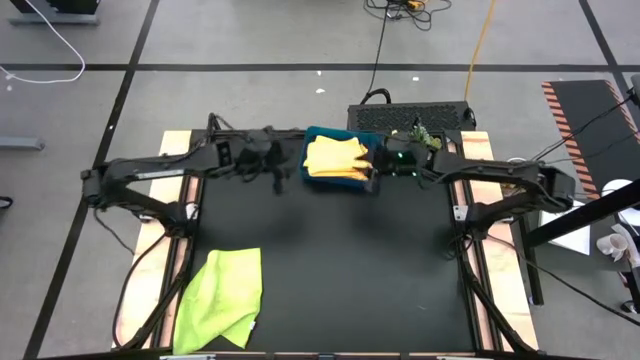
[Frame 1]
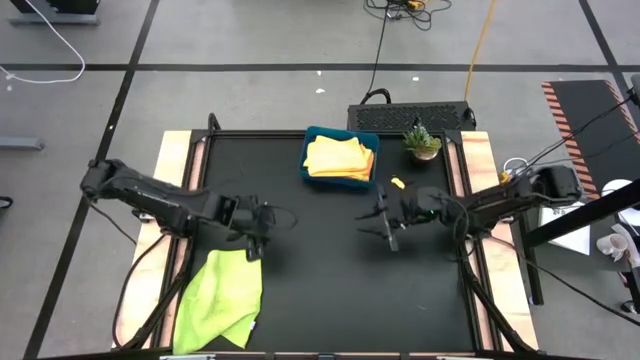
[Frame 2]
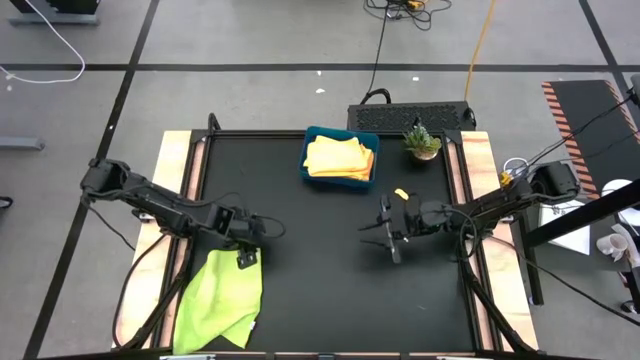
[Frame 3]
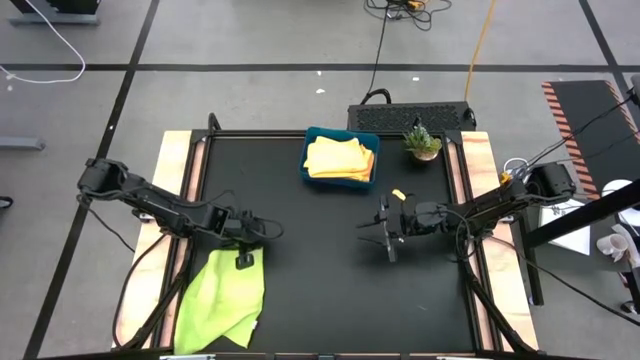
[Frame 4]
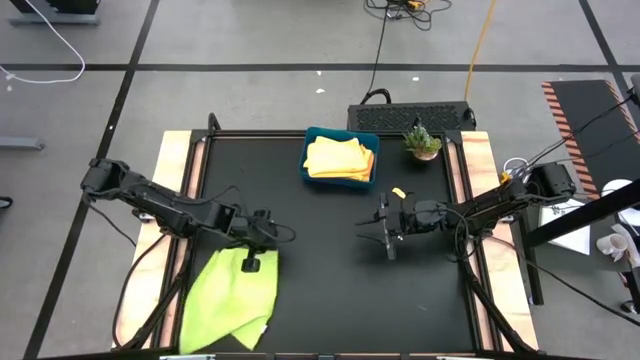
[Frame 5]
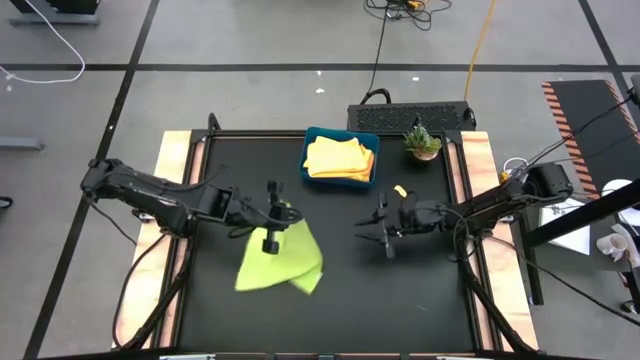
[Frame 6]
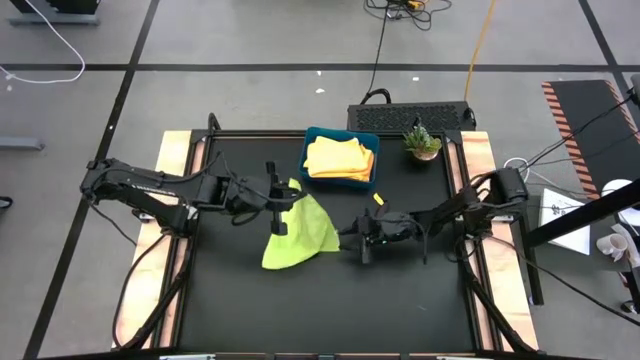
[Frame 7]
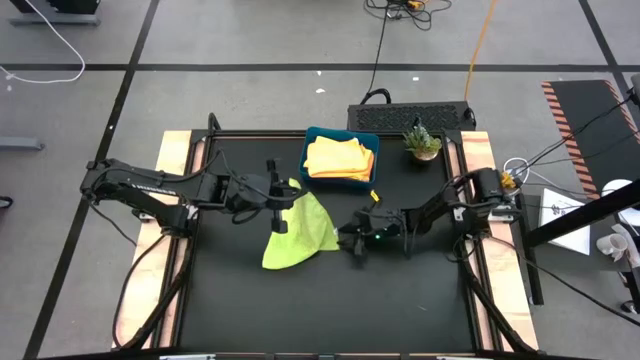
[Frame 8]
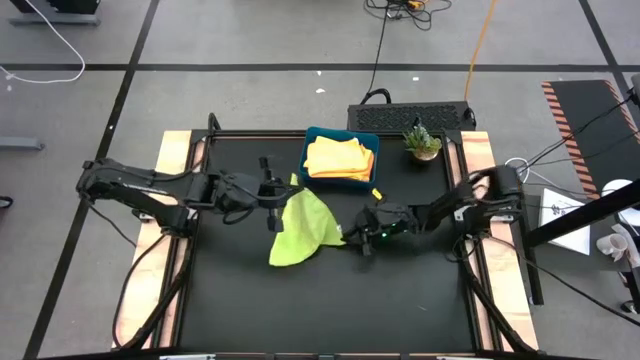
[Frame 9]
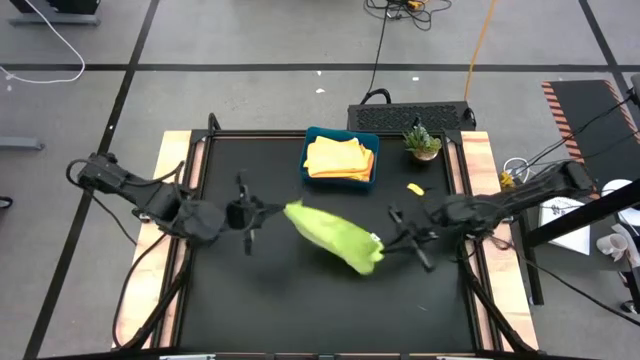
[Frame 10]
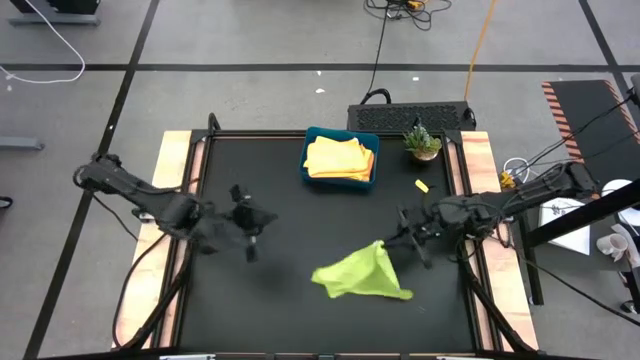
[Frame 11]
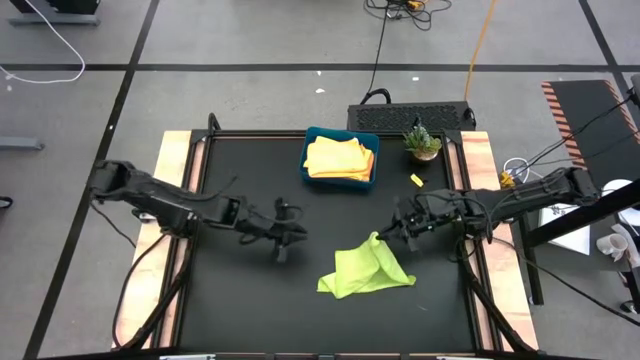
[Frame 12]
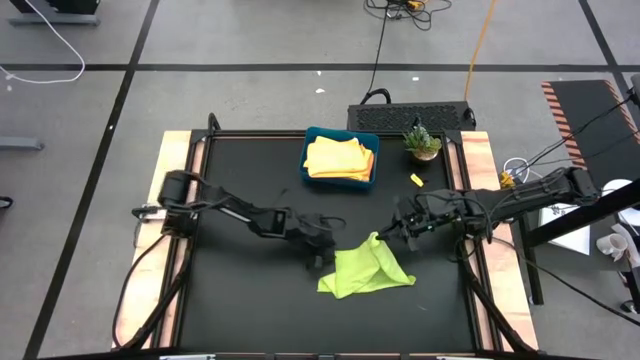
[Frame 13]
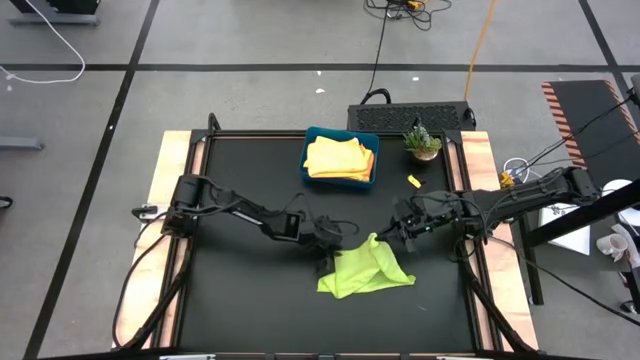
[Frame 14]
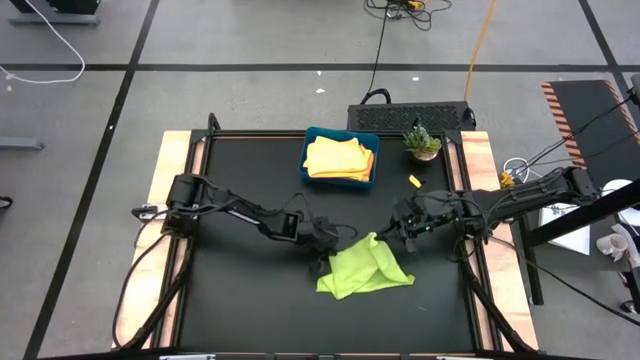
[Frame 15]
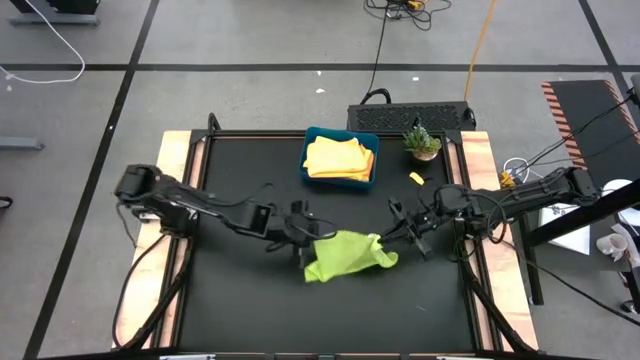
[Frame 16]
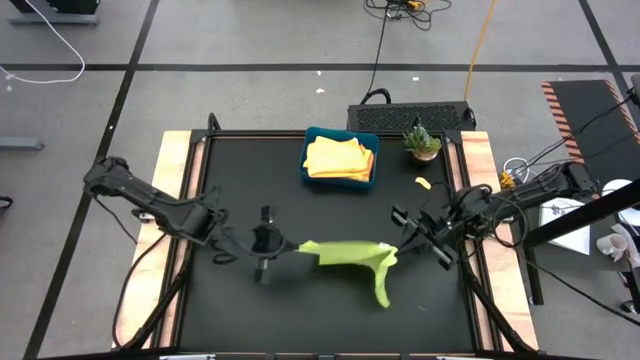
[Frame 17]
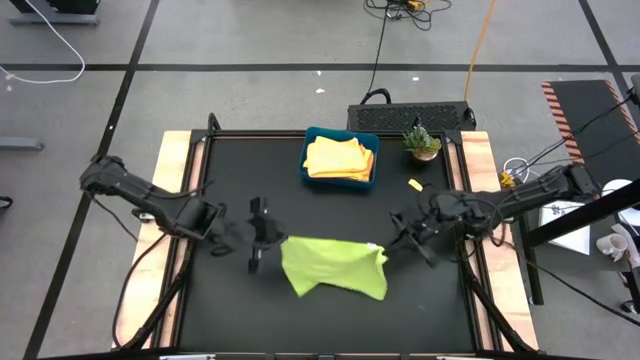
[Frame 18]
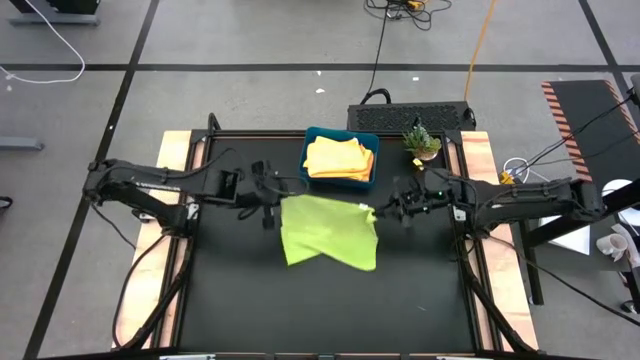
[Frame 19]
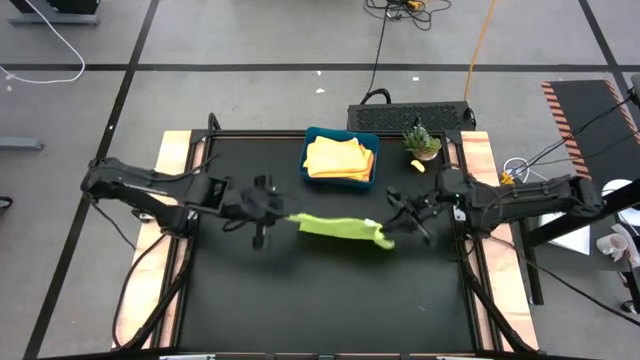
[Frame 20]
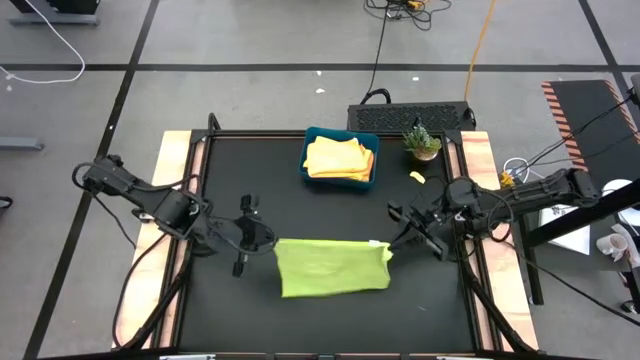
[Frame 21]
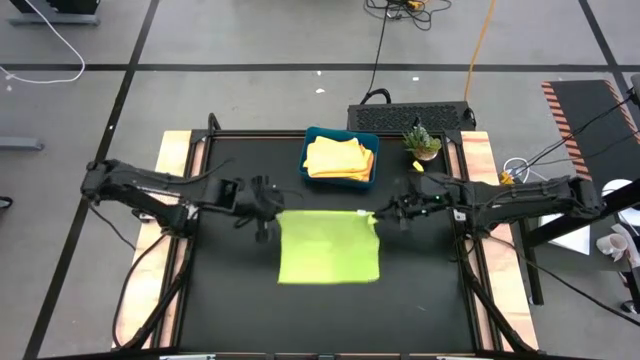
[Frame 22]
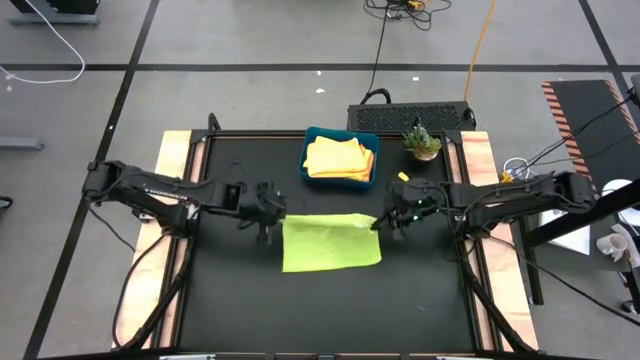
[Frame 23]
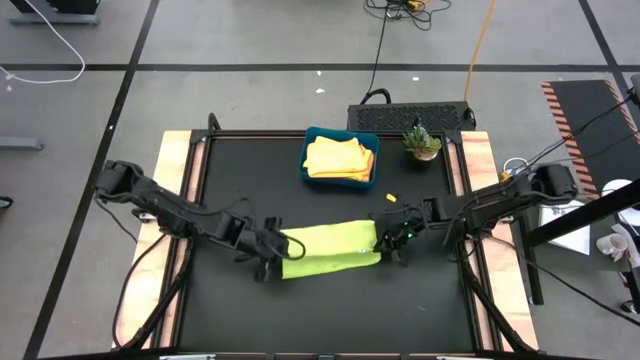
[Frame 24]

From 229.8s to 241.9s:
Task: Fold microfiber towels
Fold the green microfiber cloth

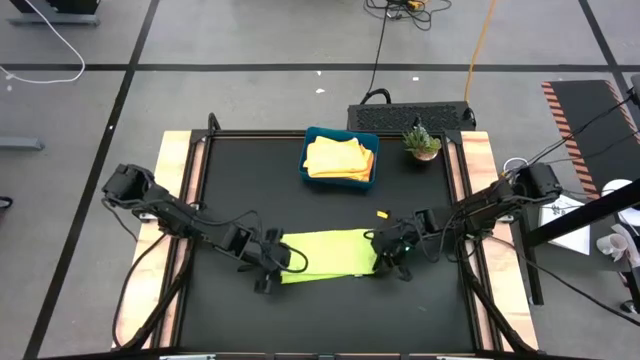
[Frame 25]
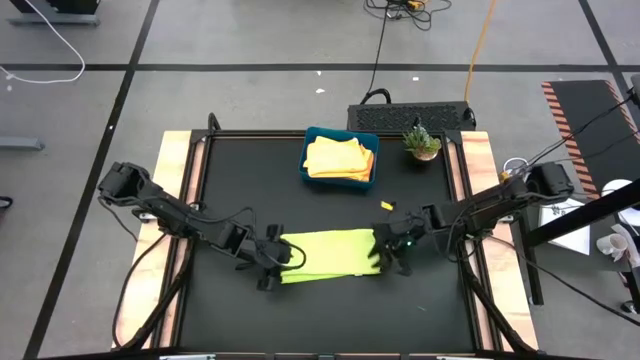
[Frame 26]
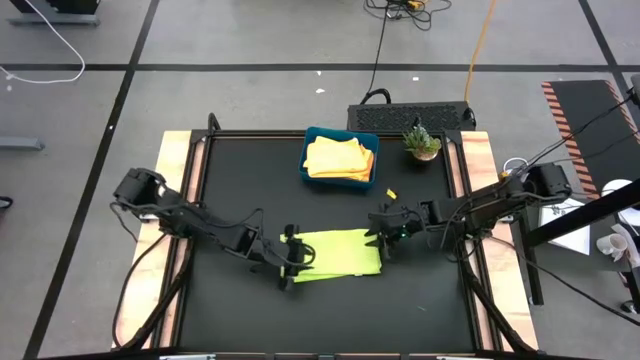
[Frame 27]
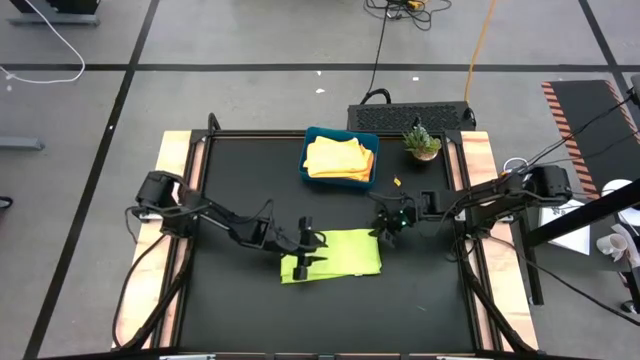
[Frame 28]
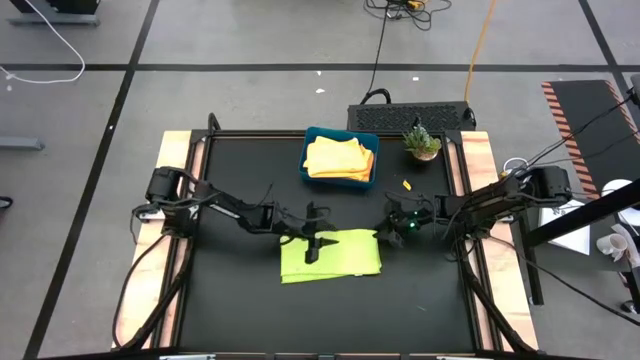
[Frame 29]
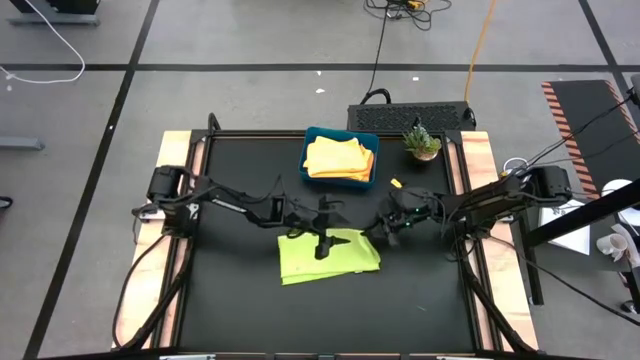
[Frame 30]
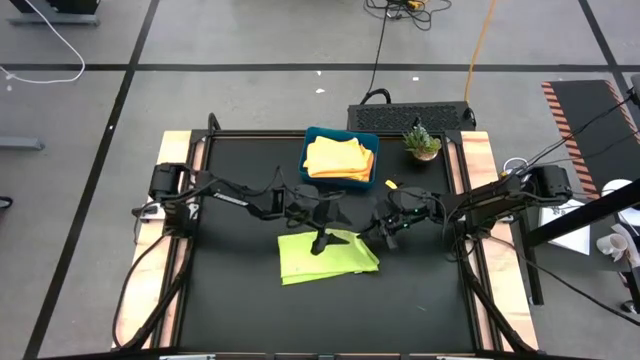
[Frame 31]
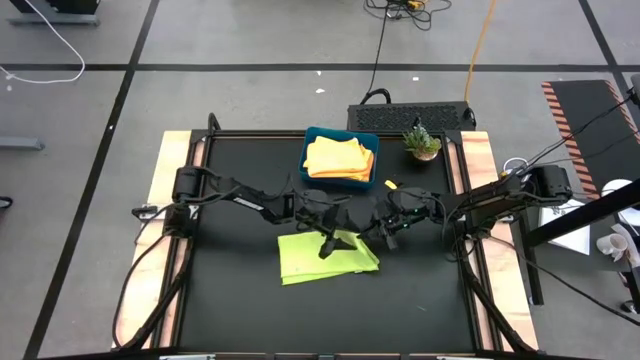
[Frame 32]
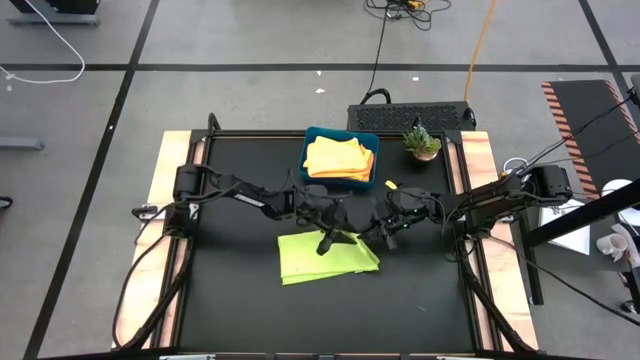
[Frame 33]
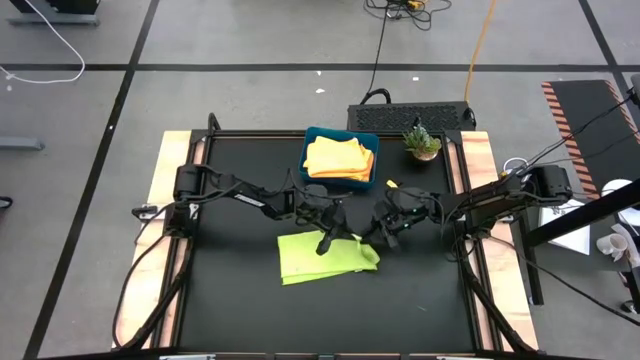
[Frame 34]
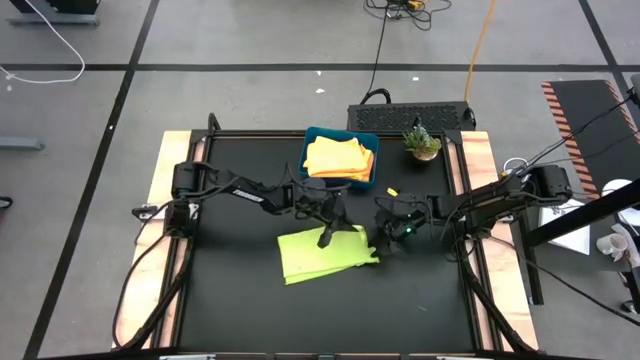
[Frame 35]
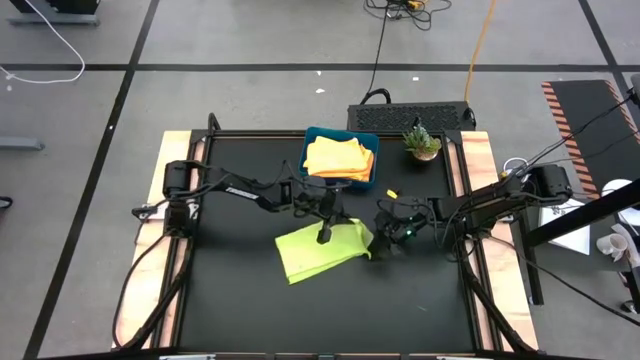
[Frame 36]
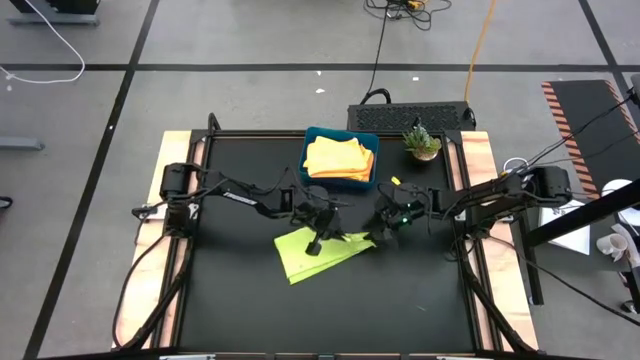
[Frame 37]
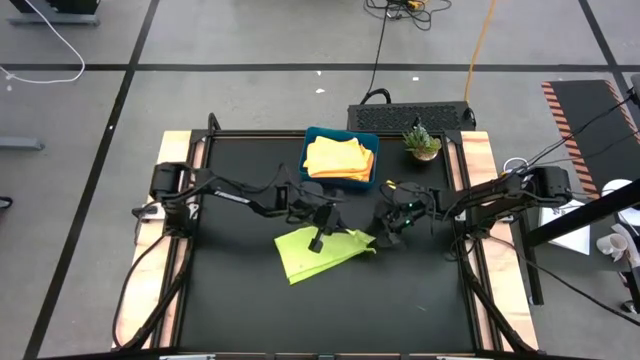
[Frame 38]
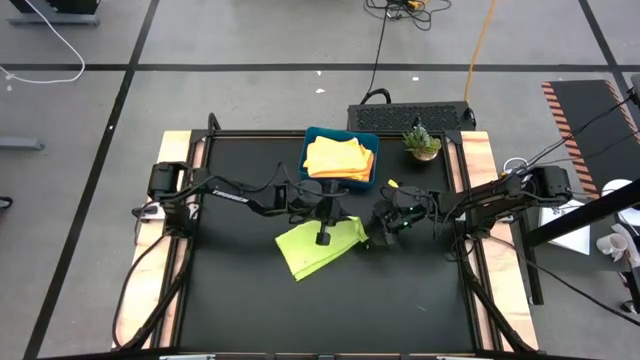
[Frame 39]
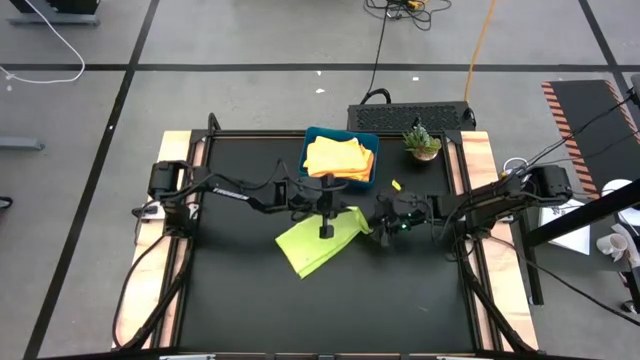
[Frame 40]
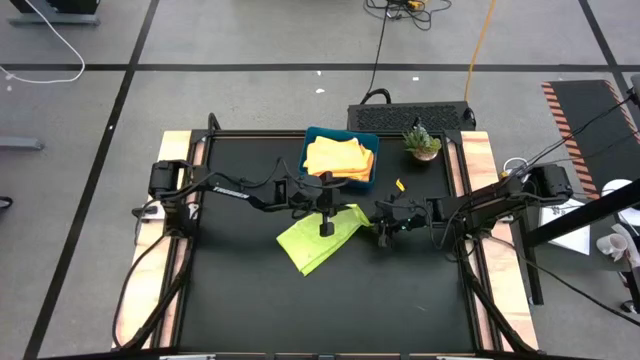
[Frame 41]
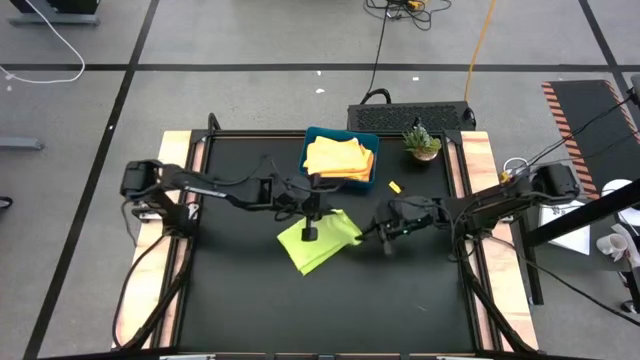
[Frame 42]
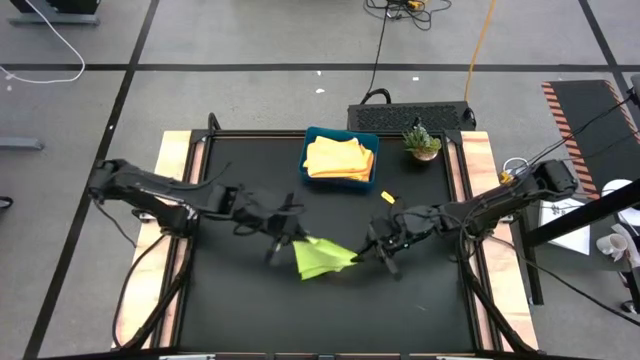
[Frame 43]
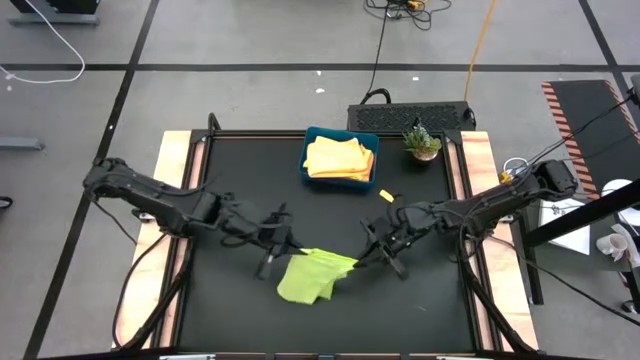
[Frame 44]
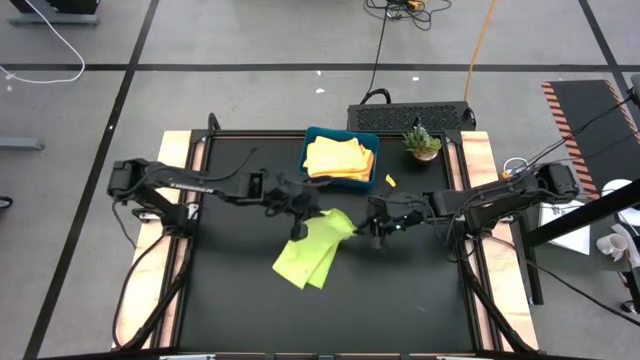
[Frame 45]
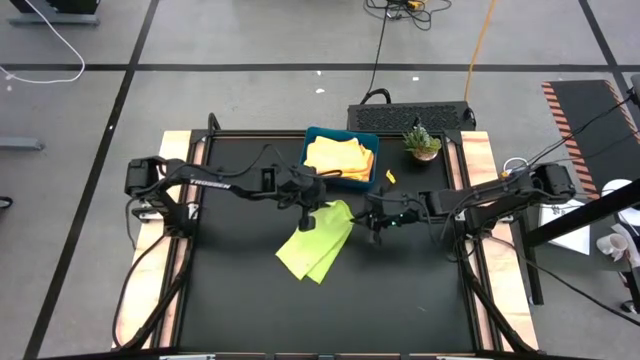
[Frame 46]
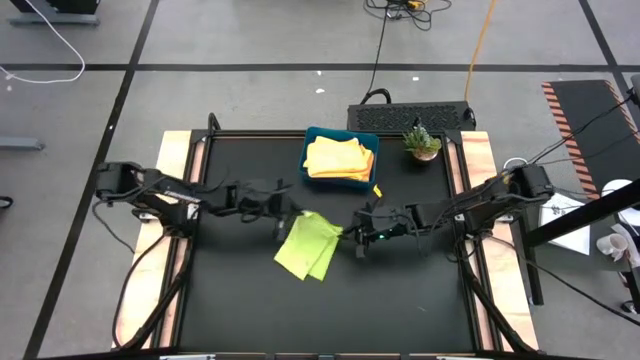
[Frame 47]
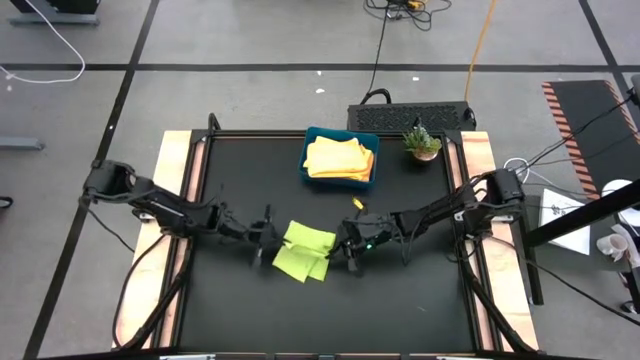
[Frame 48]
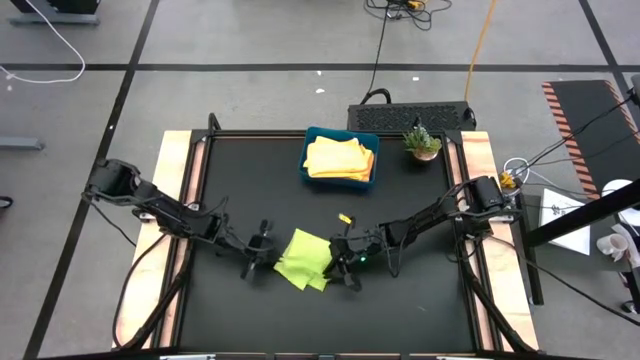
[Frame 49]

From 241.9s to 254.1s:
Fold the green microfiber cloth
